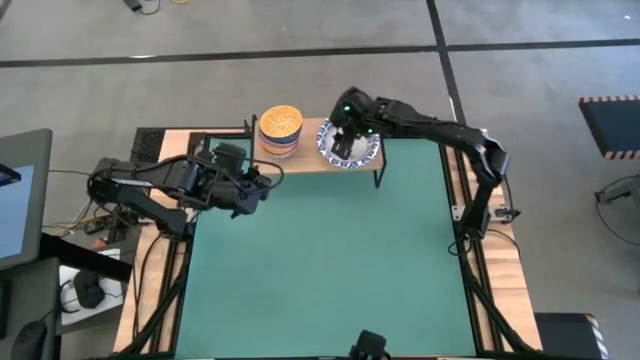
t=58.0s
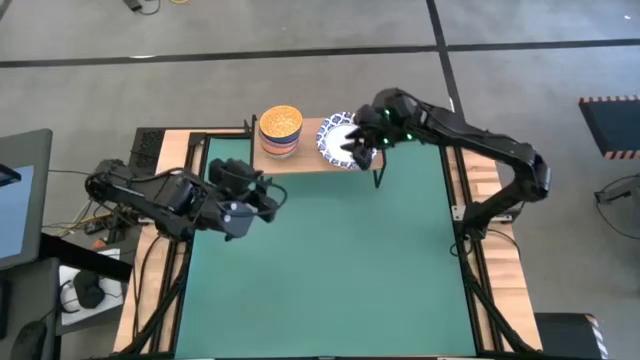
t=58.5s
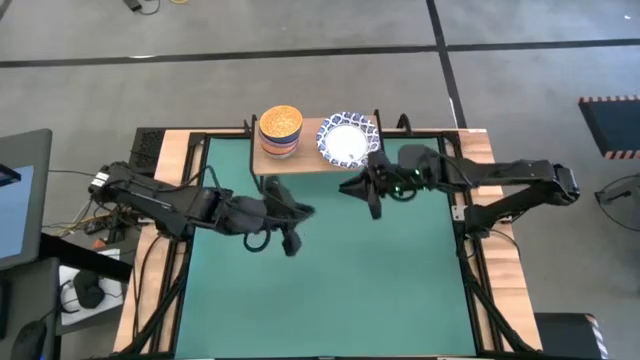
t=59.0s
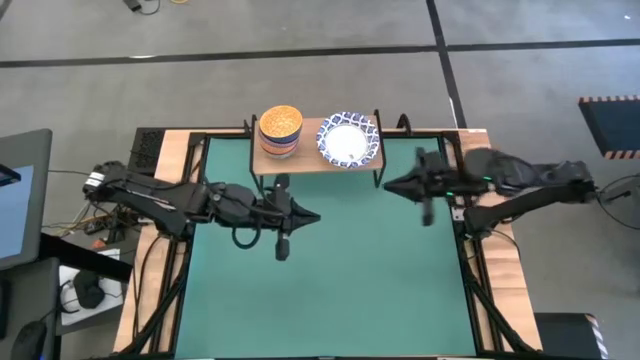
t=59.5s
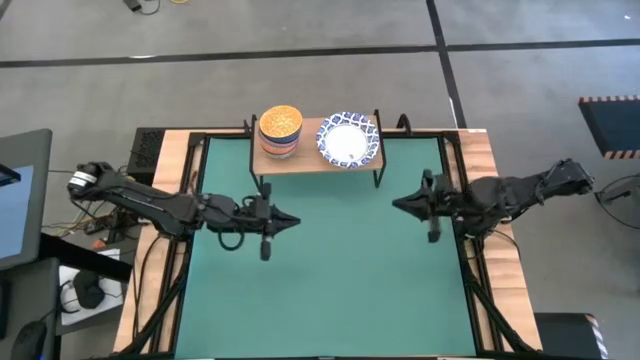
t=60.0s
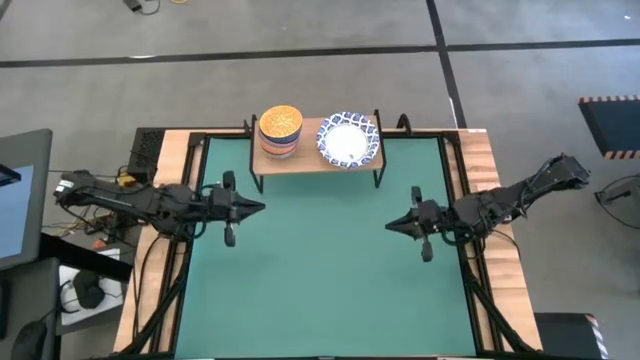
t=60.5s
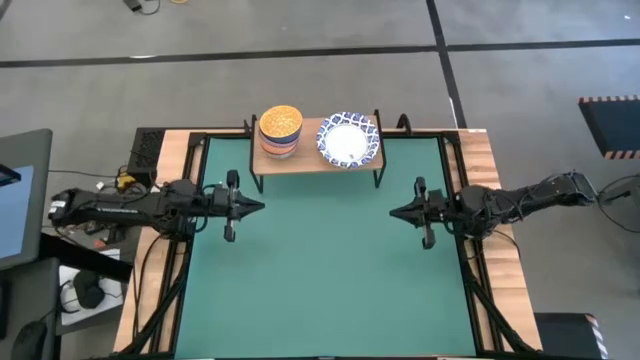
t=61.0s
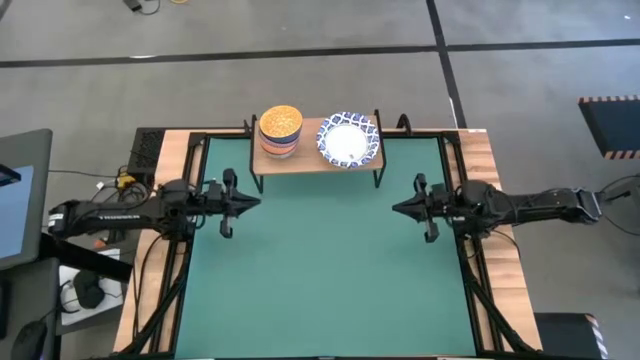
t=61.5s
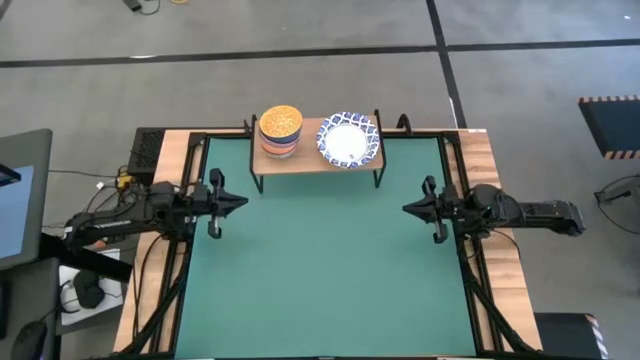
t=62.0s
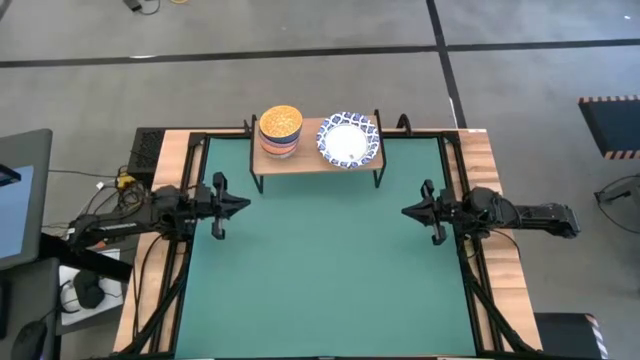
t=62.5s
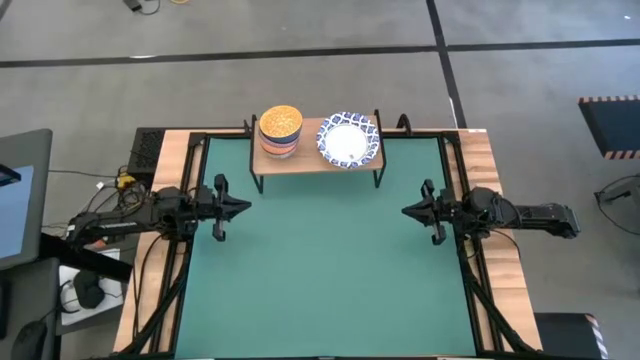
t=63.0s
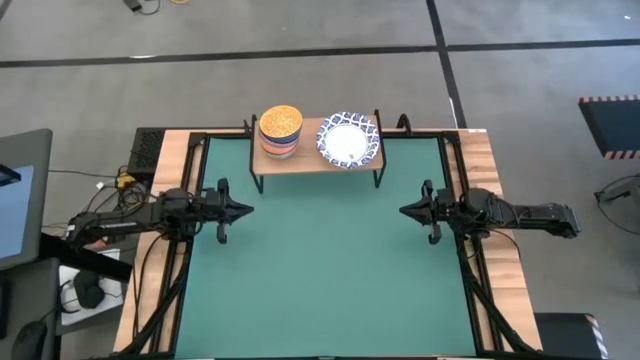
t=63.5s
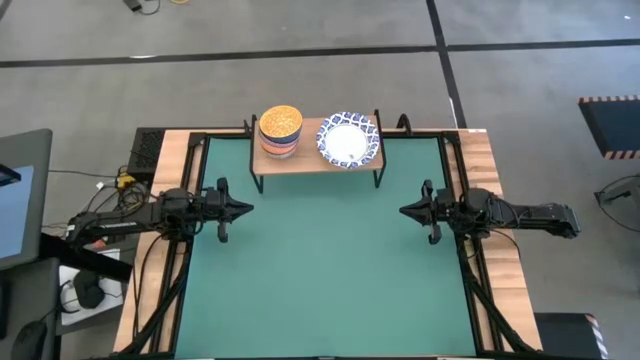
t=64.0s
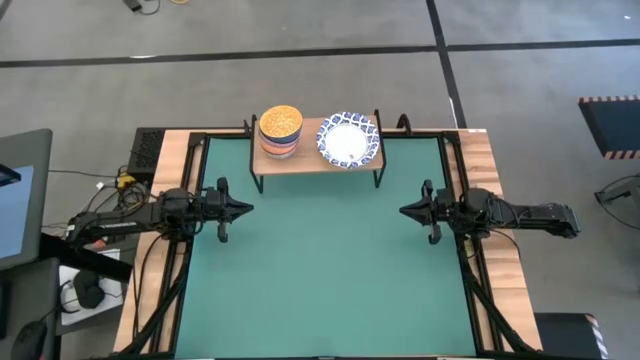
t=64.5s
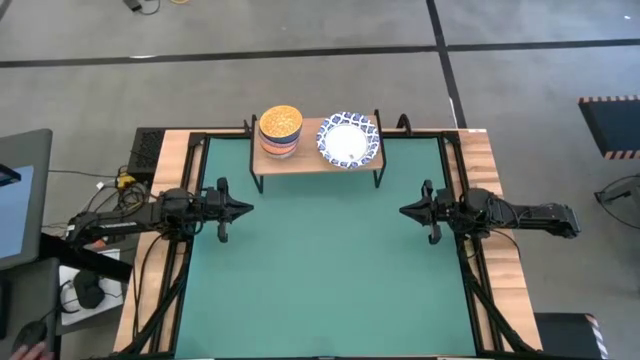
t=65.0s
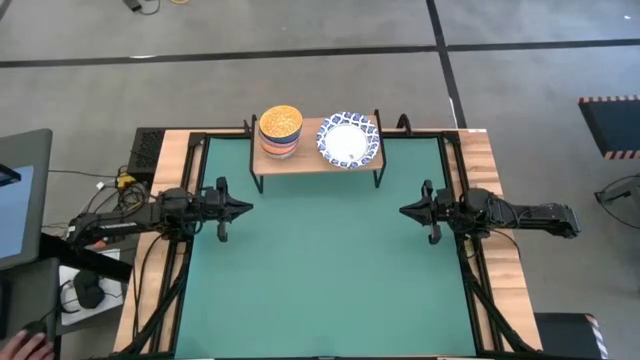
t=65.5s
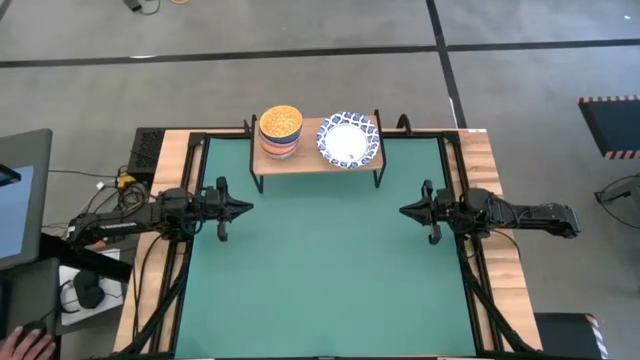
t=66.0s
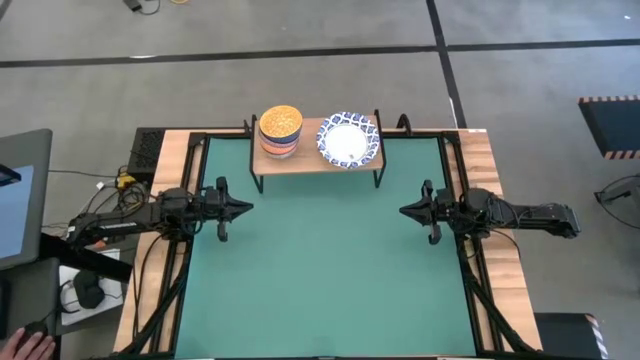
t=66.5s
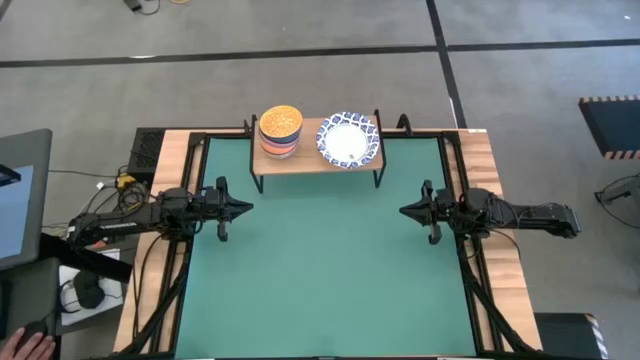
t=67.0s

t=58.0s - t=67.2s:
Task: Place and stack bowls onto a shelf
Return to Home Position

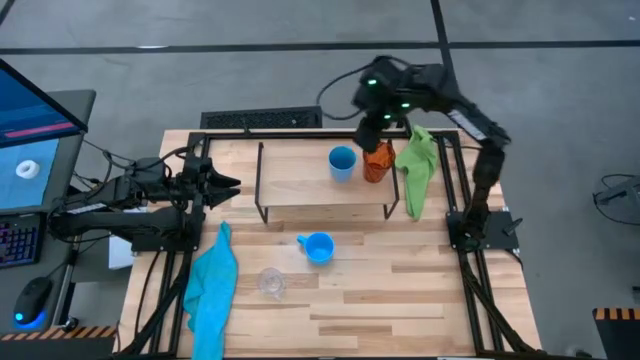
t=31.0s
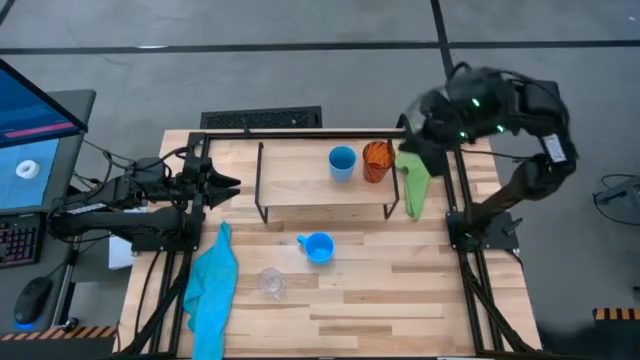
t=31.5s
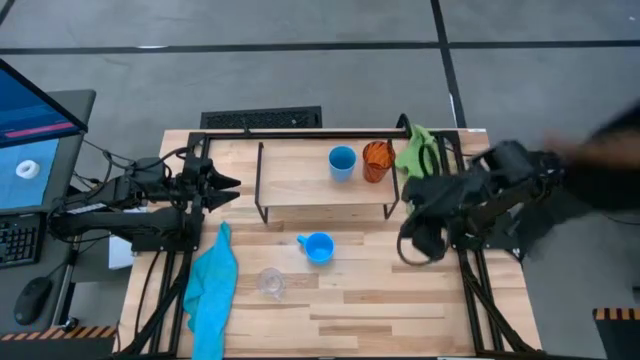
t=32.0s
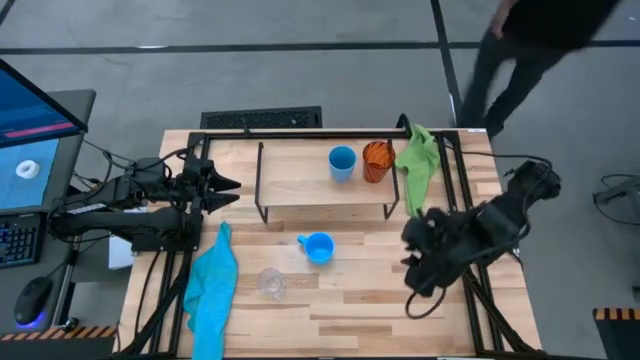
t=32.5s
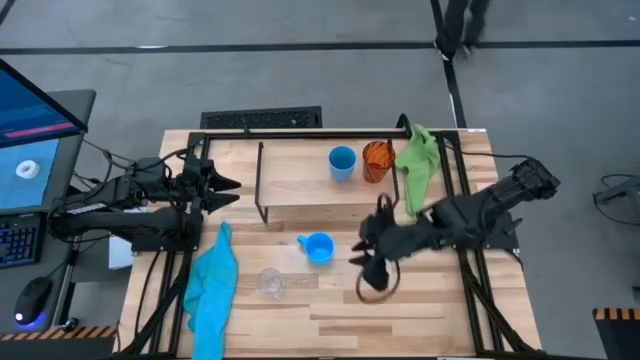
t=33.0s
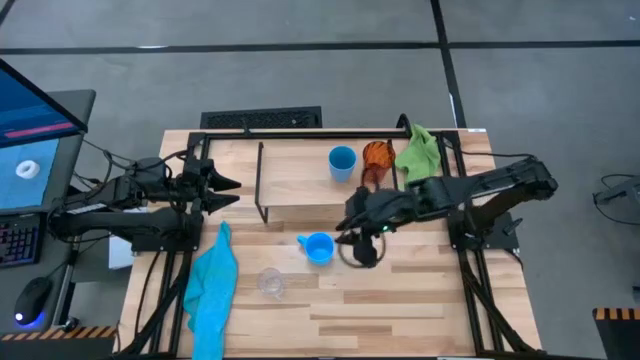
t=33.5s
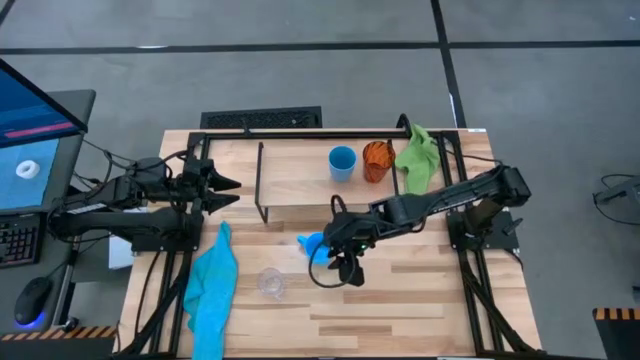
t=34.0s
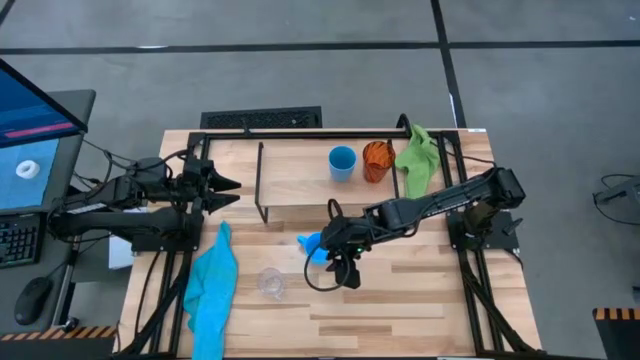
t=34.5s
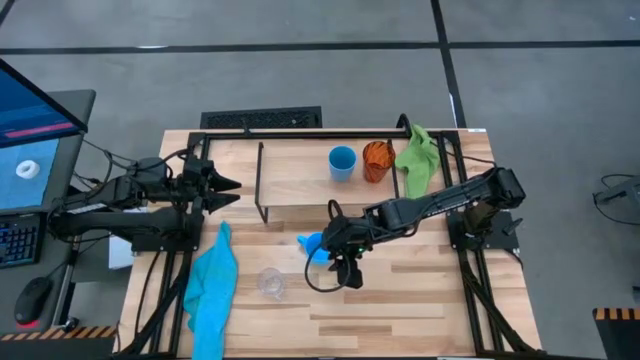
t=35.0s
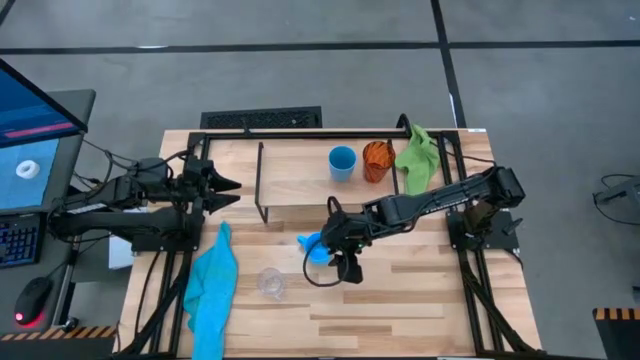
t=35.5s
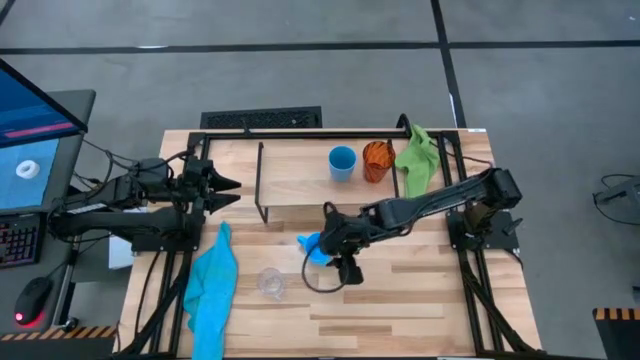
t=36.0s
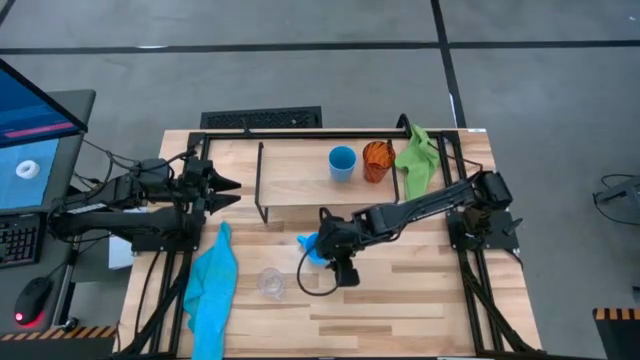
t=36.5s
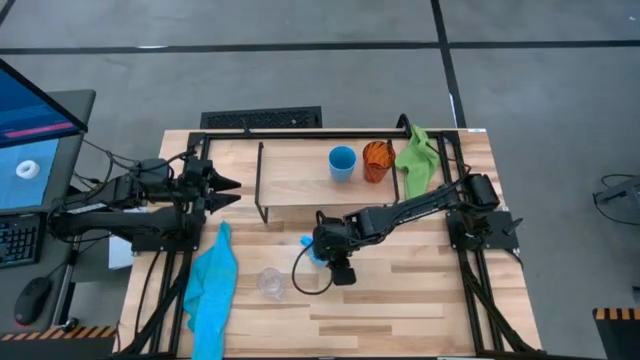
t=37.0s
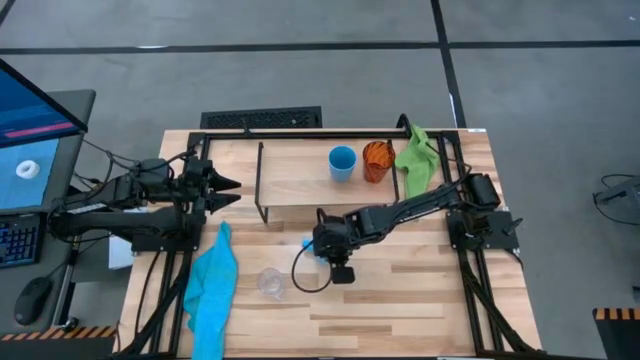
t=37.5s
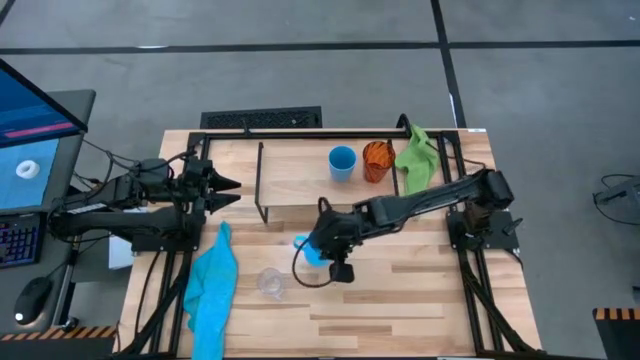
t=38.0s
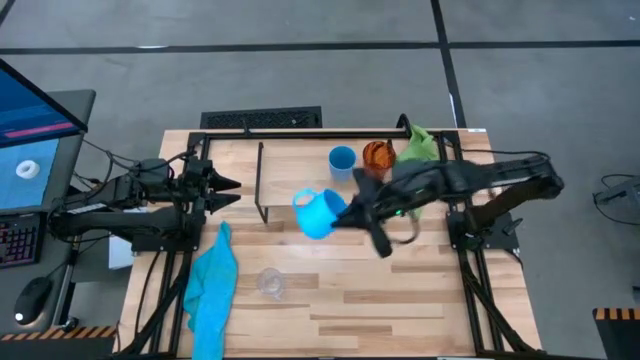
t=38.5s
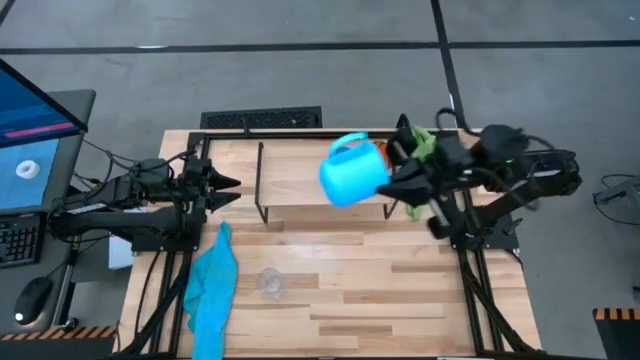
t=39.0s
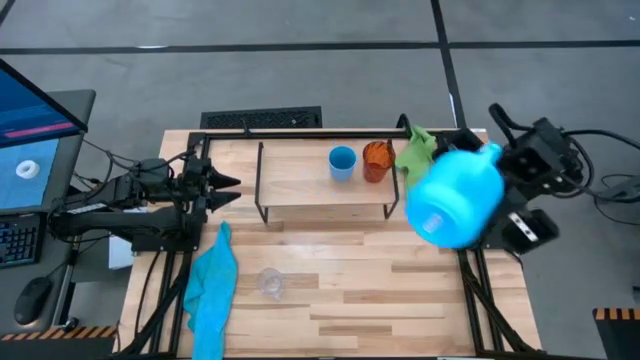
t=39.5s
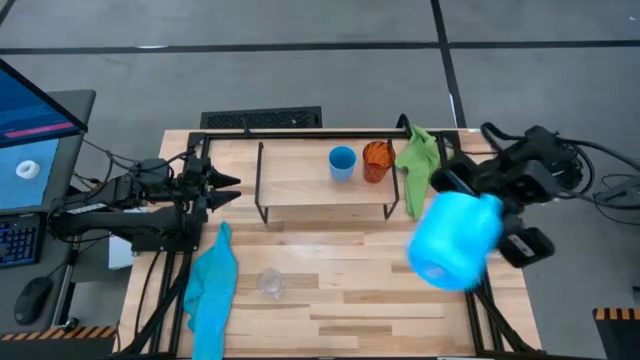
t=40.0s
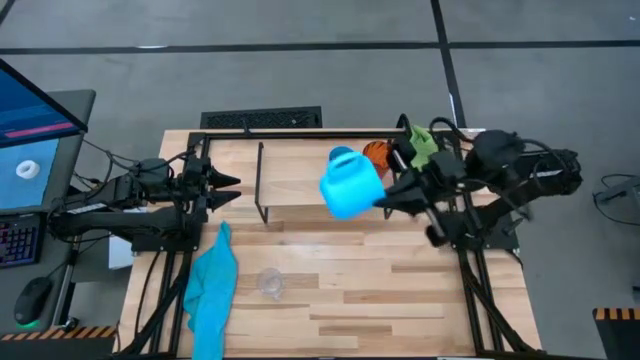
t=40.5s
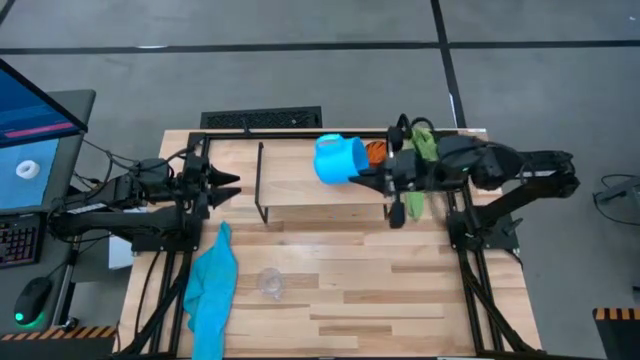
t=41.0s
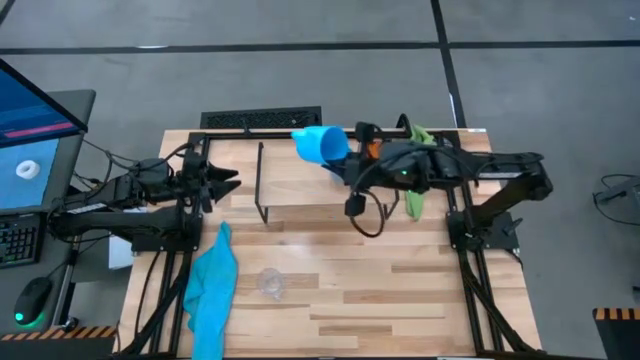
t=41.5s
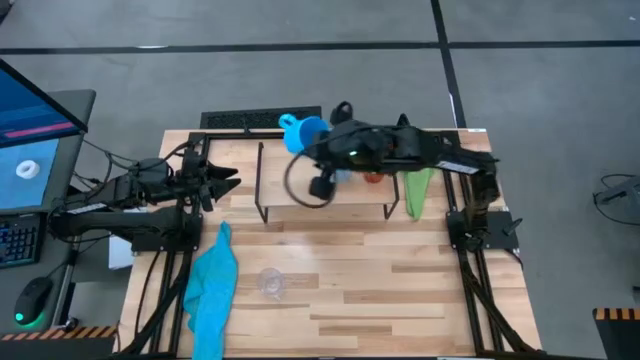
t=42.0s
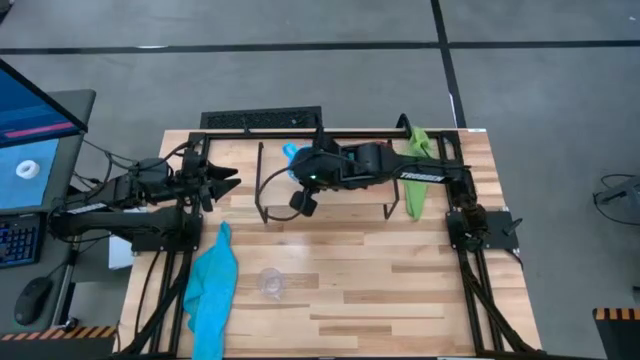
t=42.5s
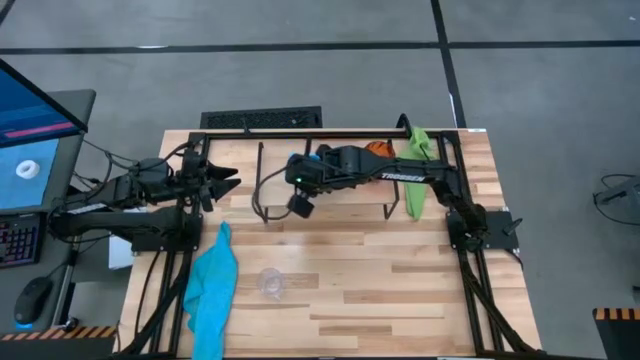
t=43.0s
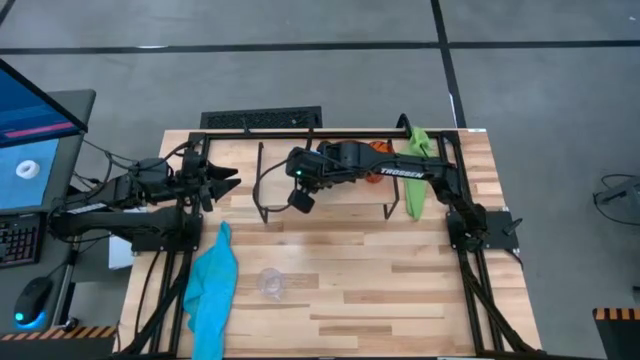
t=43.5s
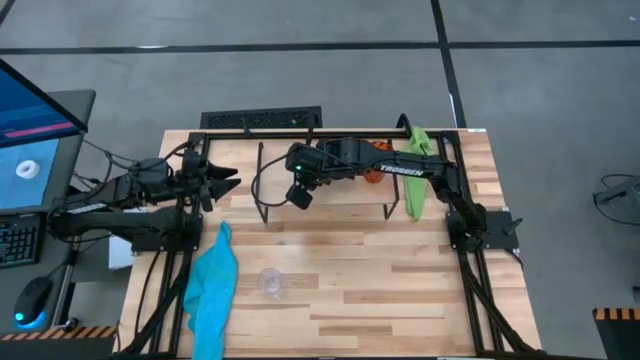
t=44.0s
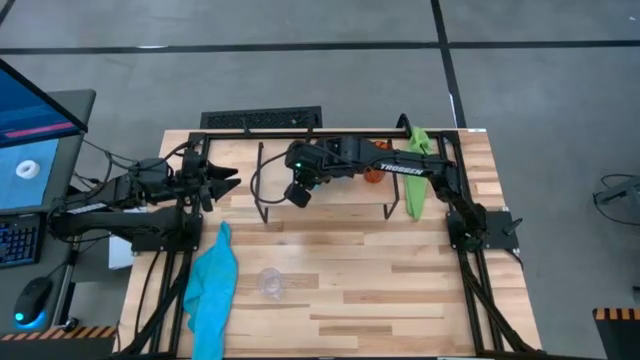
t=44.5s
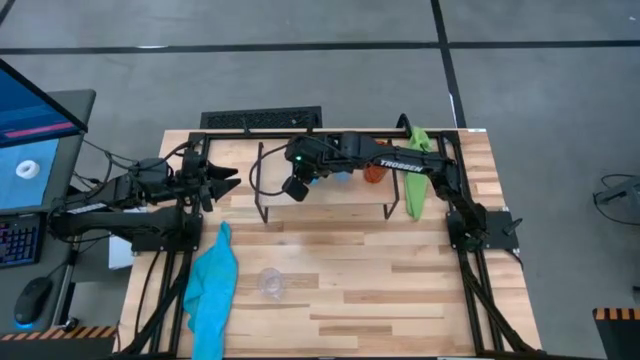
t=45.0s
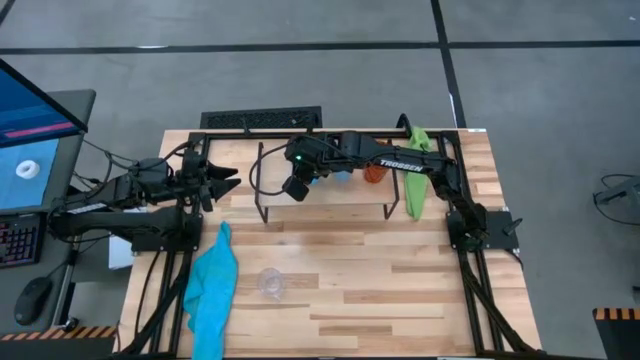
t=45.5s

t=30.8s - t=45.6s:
Task: Stack small to large cups/mugs on shelf
Put the blue mug on the shelf
